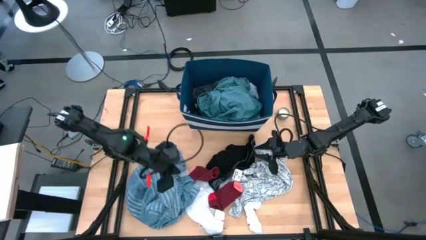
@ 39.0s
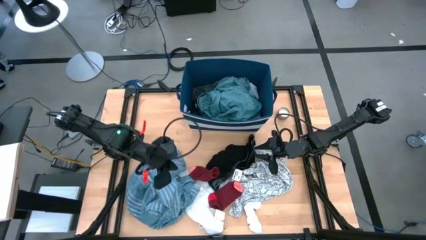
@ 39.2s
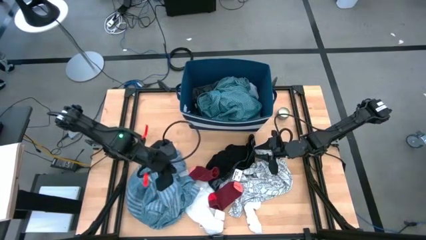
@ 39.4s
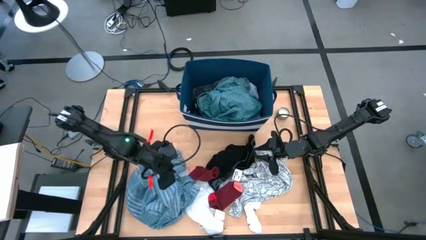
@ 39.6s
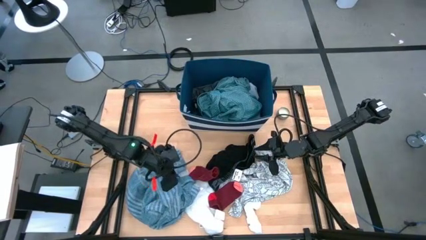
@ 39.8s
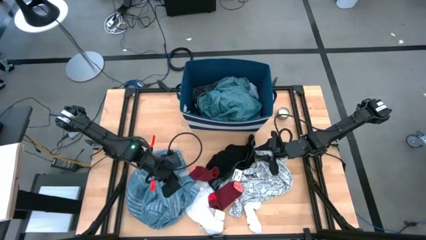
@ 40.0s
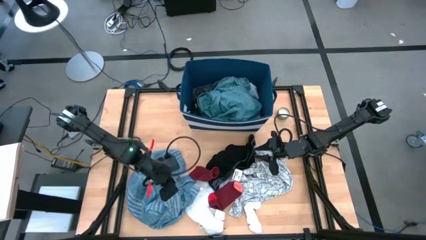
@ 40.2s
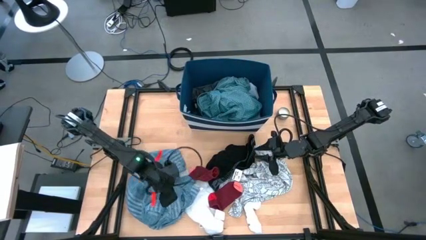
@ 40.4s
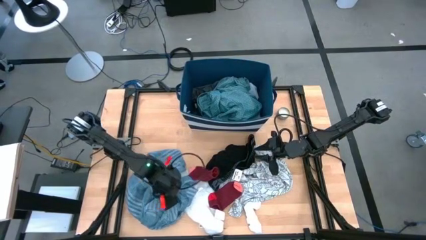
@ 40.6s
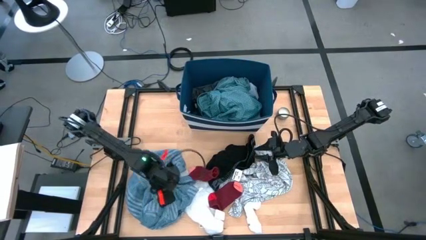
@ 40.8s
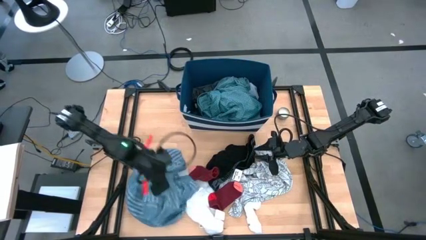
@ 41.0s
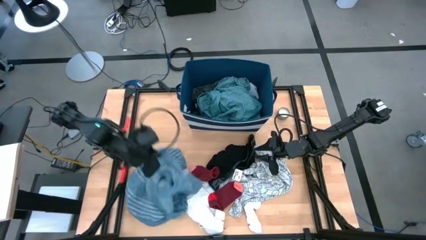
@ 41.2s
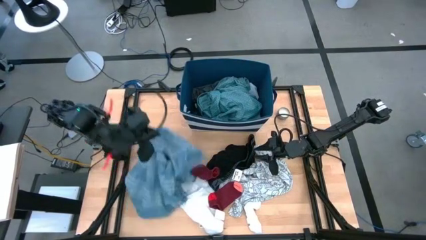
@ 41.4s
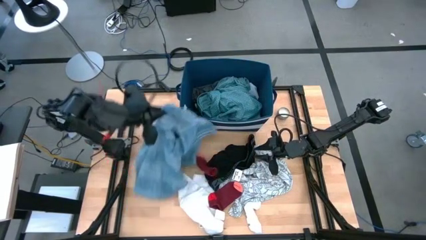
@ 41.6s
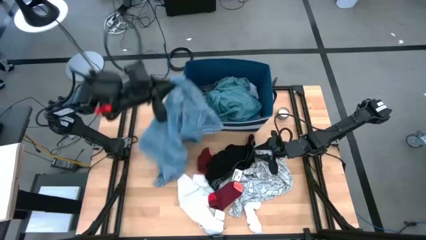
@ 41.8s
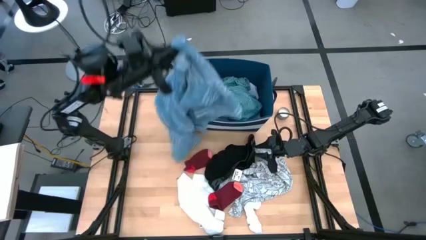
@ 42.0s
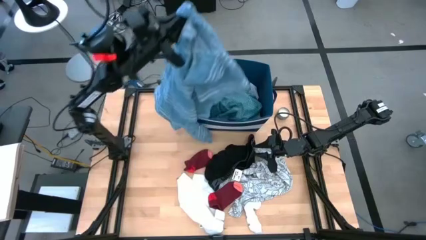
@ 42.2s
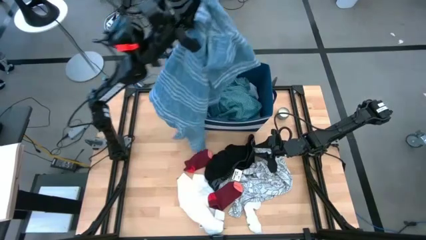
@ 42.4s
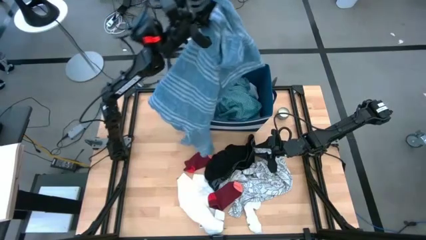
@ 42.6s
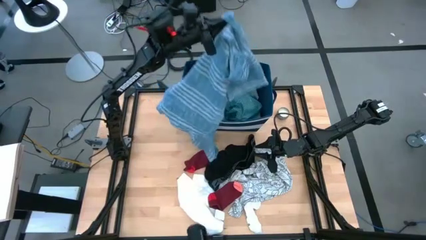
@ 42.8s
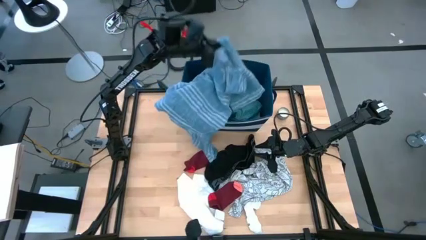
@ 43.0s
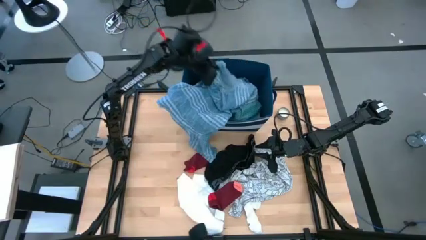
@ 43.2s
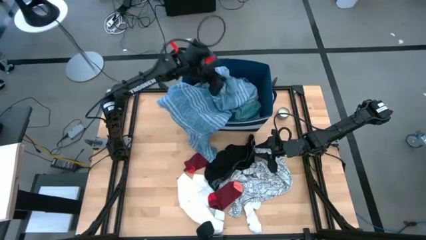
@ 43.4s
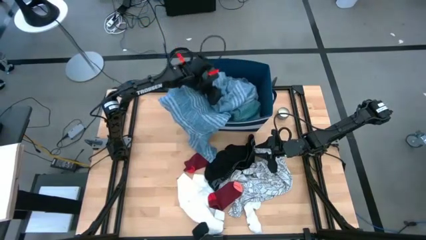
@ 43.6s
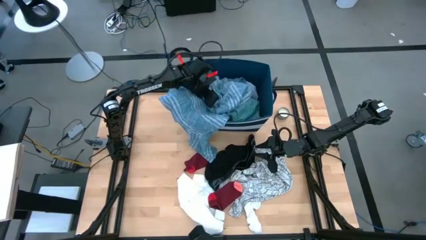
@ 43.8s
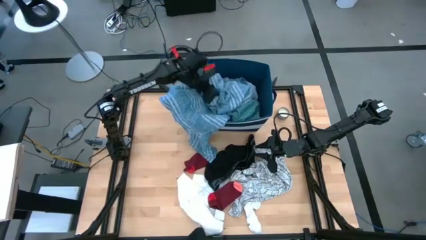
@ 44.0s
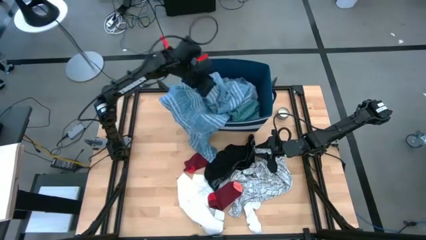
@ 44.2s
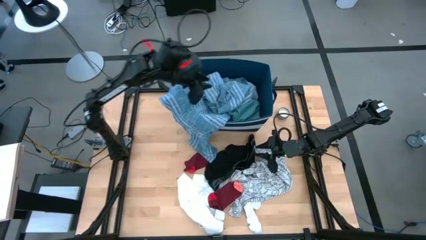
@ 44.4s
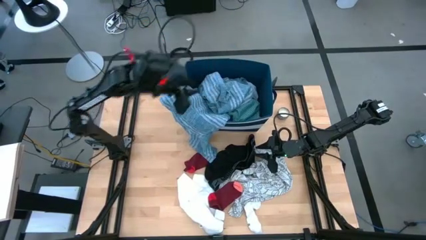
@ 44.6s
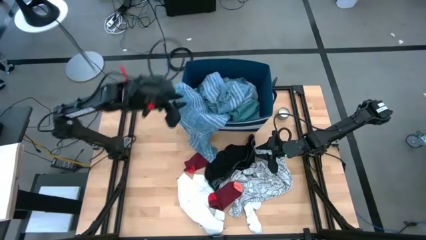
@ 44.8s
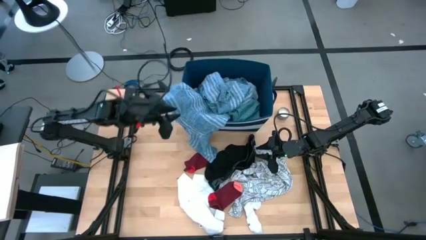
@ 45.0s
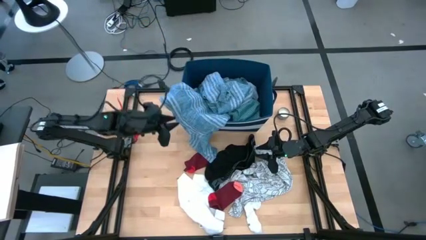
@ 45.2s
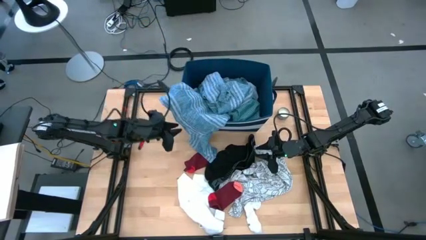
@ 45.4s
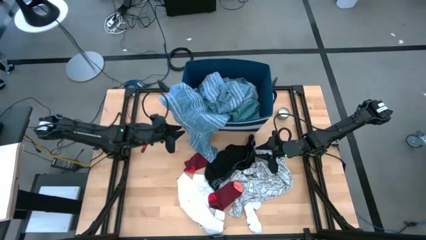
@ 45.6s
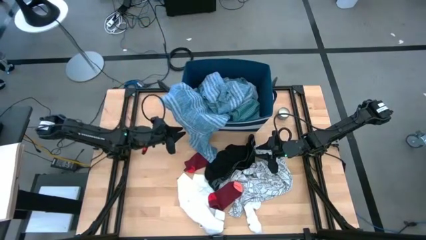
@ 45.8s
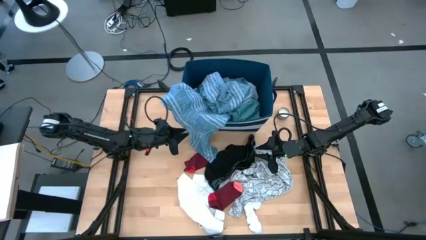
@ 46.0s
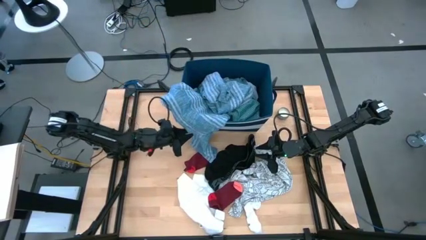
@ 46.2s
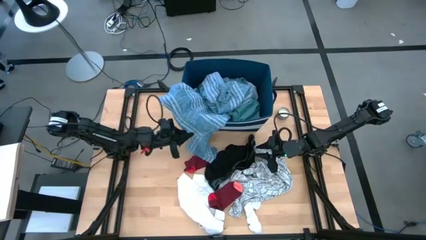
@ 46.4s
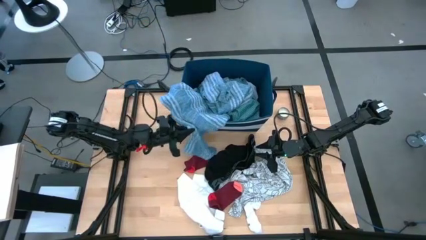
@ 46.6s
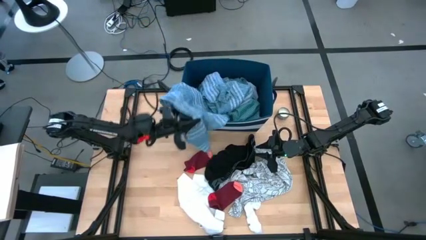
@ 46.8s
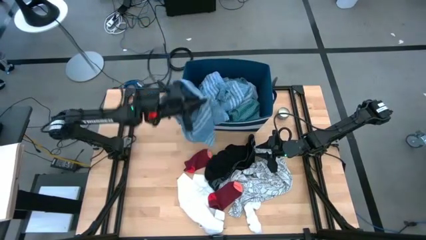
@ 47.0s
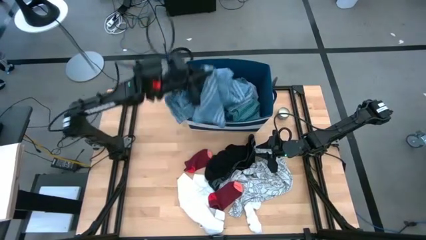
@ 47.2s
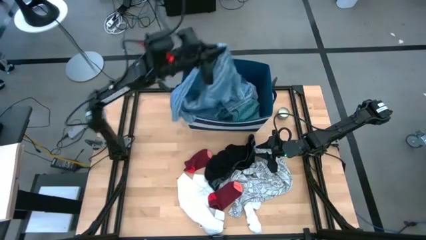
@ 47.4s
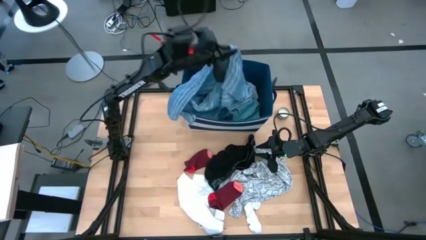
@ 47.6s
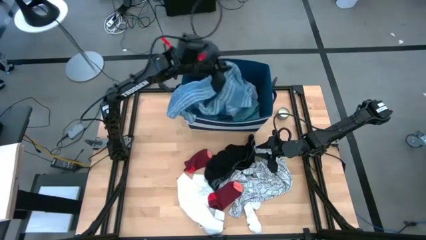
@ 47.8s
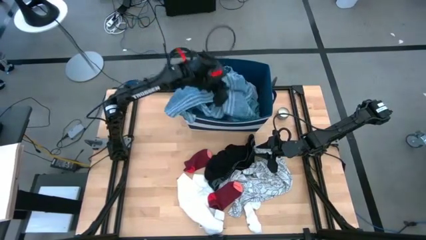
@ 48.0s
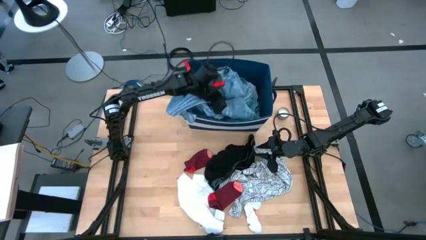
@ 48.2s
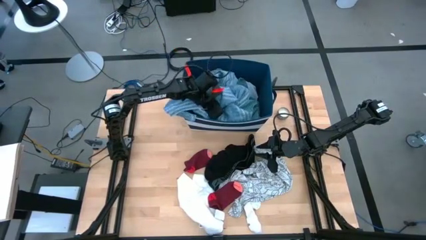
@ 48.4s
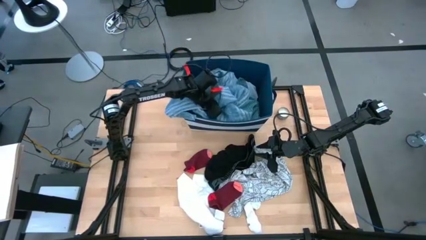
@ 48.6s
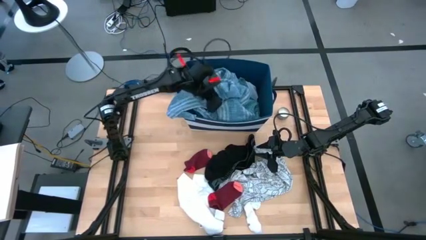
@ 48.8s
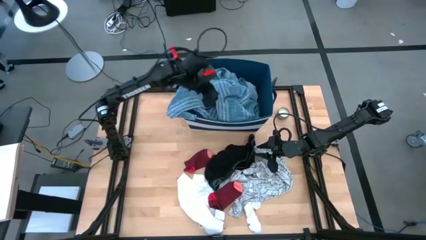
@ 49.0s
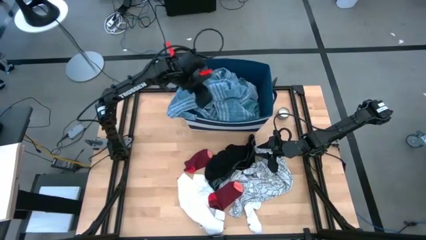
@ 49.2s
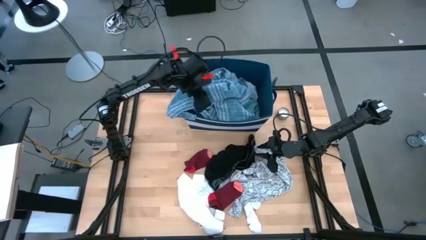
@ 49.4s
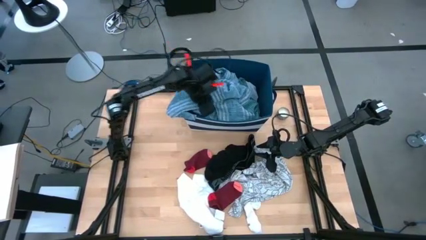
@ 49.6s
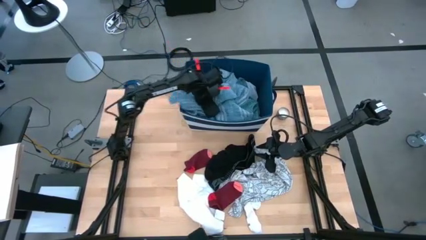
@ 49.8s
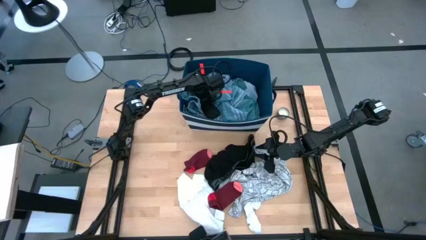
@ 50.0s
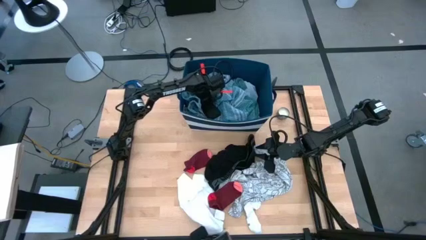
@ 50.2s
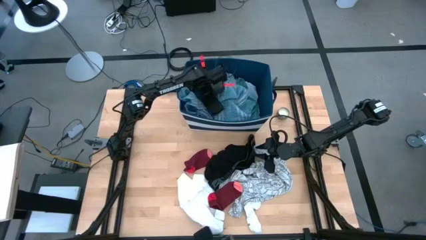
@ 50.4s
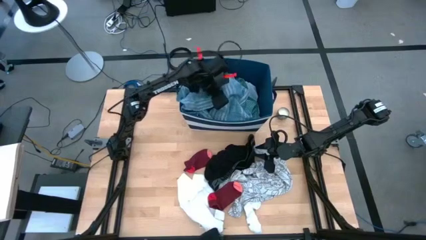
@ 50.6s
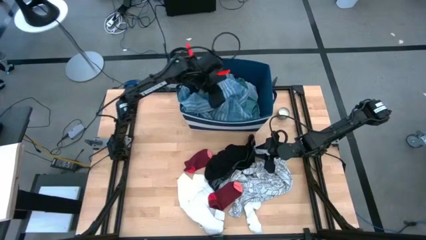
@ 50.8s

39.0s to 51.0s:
Task: Sort clothes
Put the blue shirt into the blue laundry bin

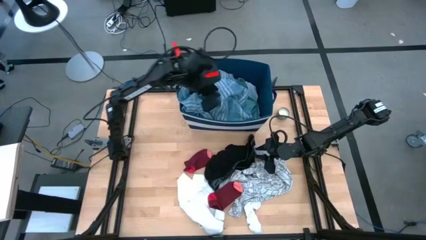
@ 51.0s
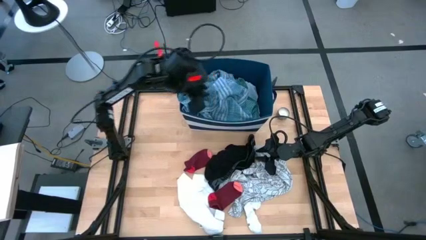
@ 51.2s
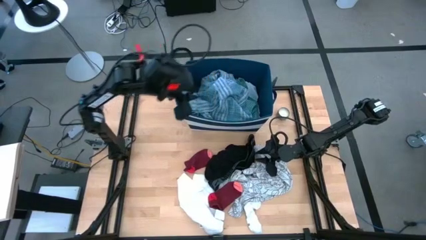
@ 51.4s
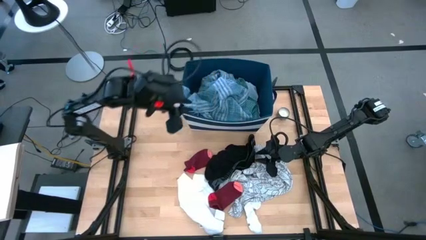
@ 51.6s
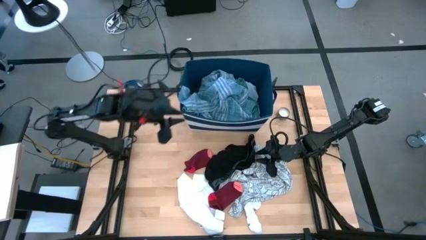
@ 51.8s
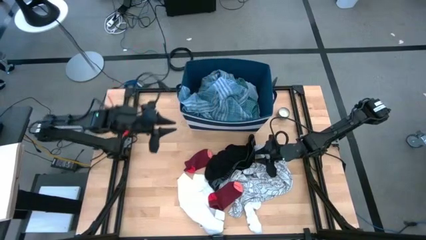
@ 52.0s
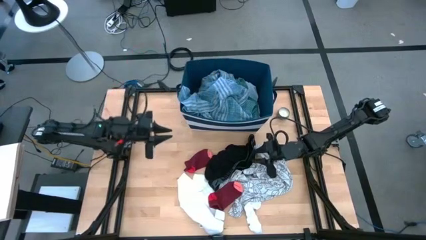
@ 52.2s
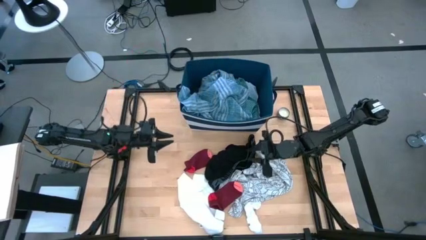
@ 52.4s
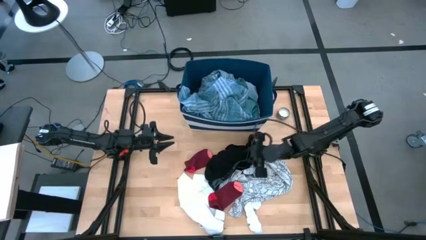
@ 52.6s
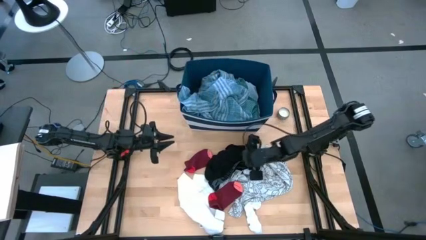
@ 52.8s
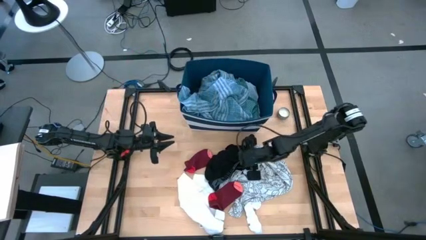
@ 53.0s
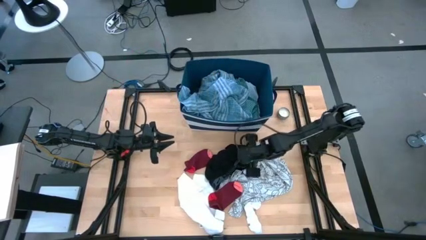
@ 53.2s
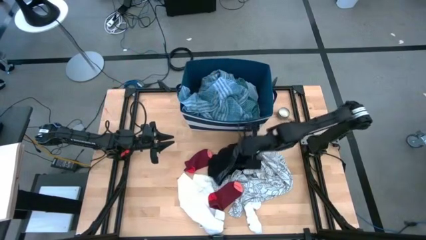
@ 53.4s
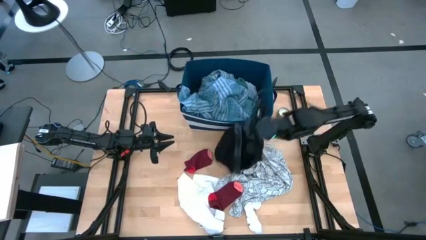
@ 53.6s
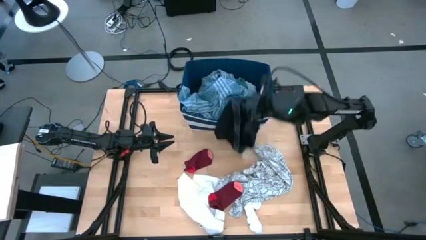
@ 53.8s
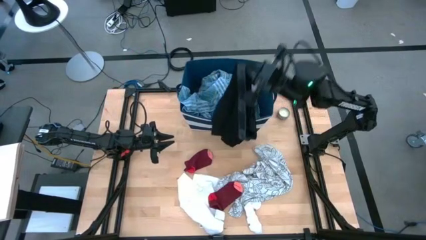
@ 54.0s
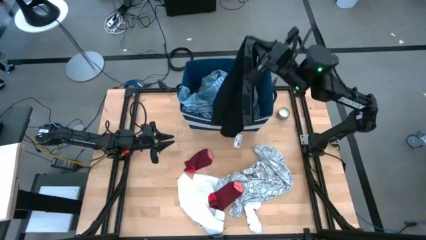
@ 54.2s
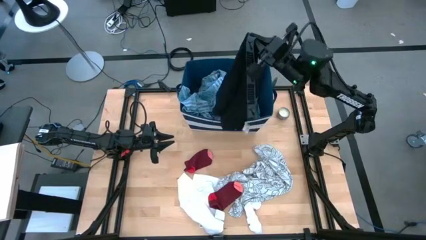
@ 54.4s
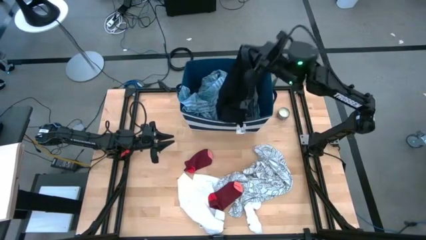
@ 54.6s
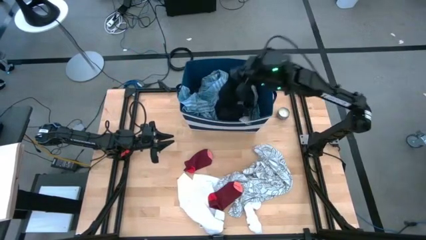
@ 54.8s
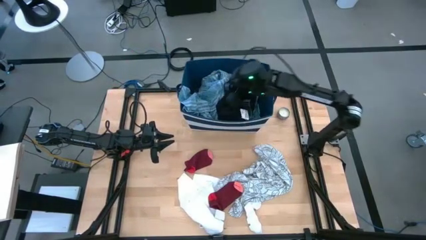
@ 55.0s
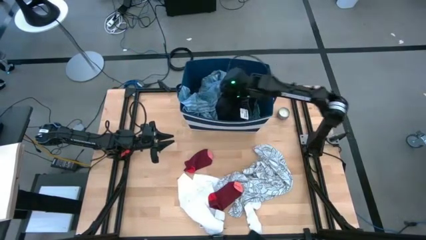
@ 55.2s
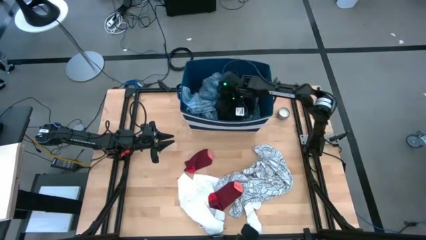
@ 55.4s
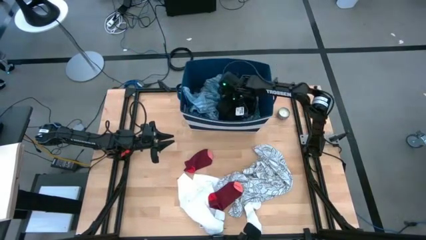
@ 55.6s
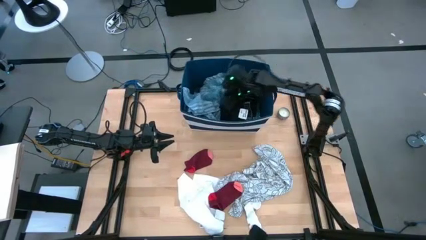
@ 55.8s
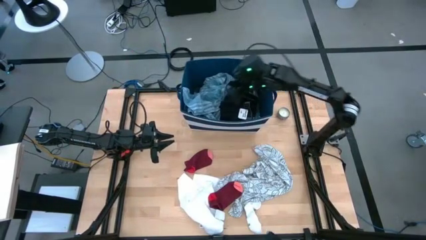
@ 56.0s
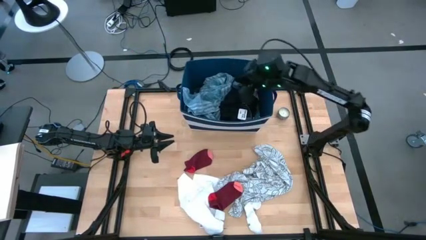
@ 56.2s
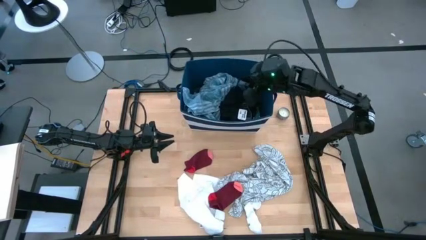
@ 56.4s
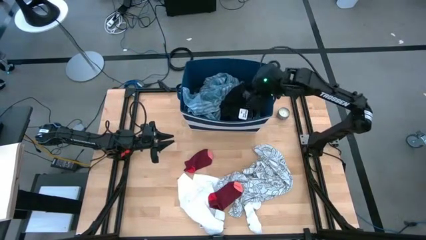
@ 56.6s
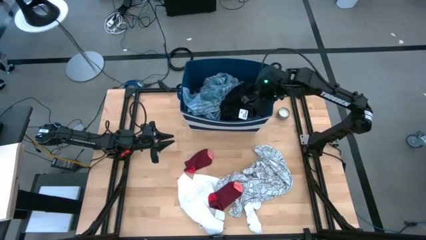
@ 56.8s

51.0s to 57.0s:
Put the black boxer into the blue laundry bin
